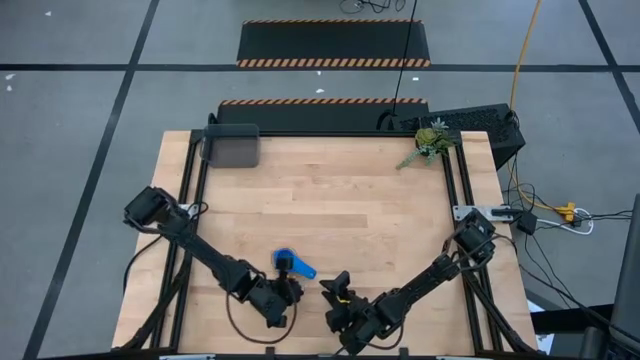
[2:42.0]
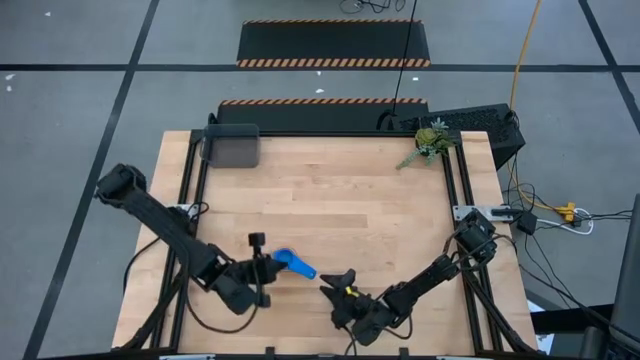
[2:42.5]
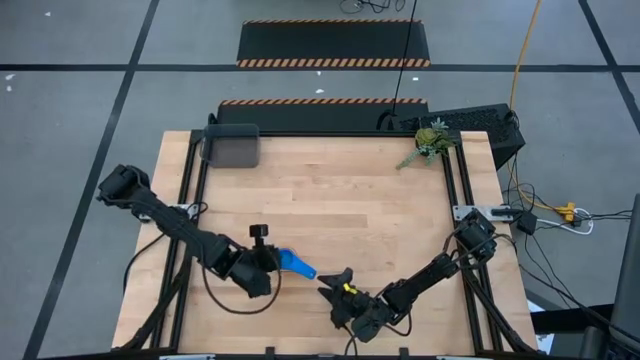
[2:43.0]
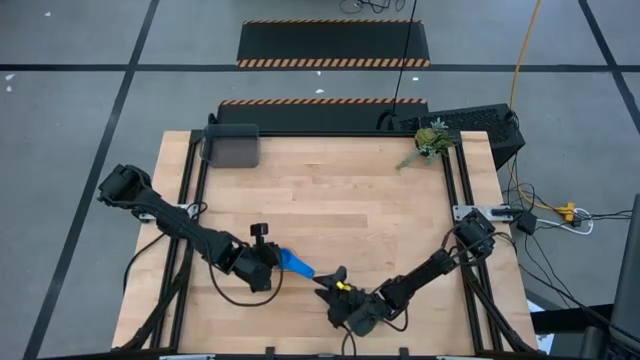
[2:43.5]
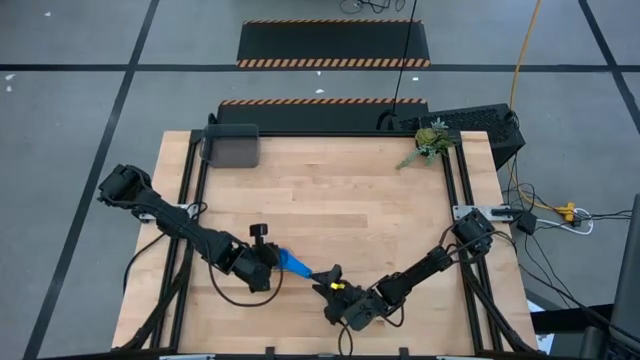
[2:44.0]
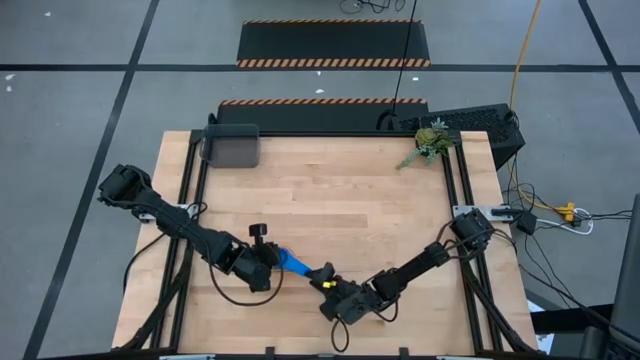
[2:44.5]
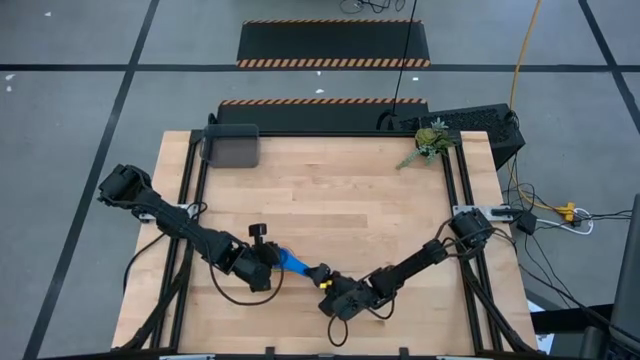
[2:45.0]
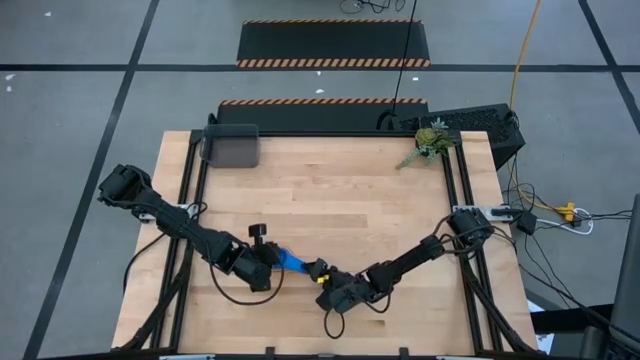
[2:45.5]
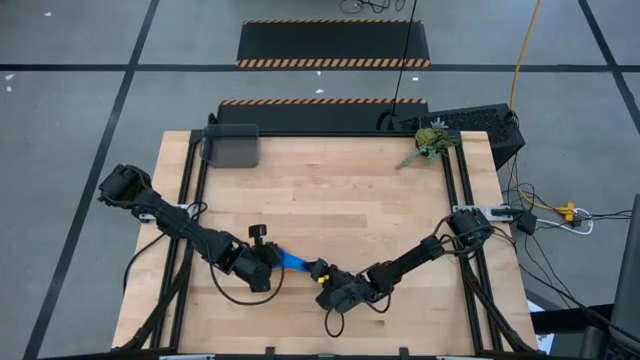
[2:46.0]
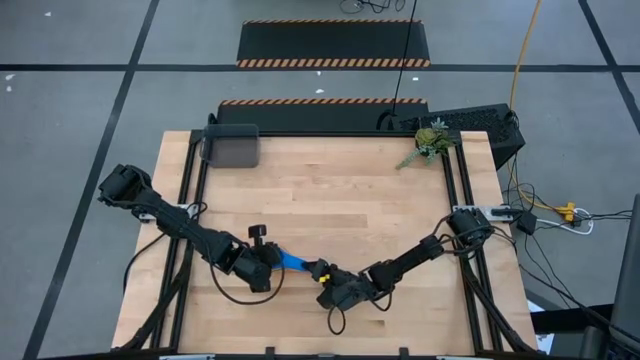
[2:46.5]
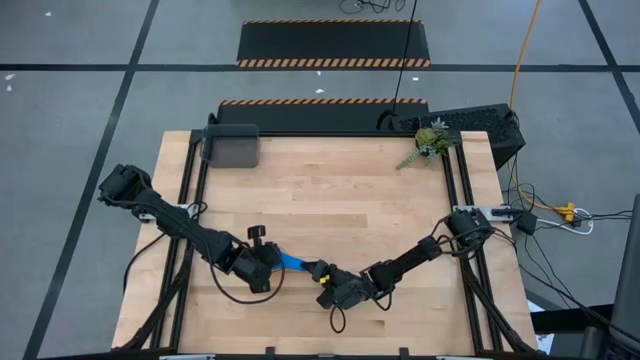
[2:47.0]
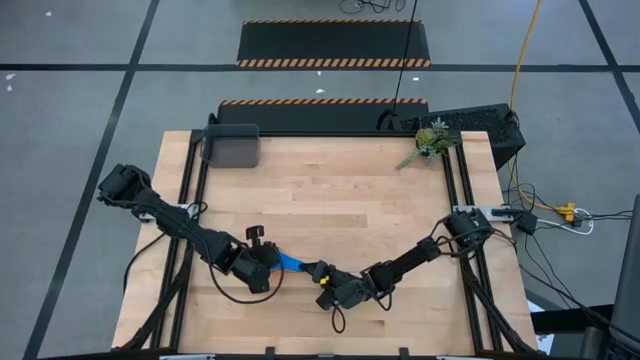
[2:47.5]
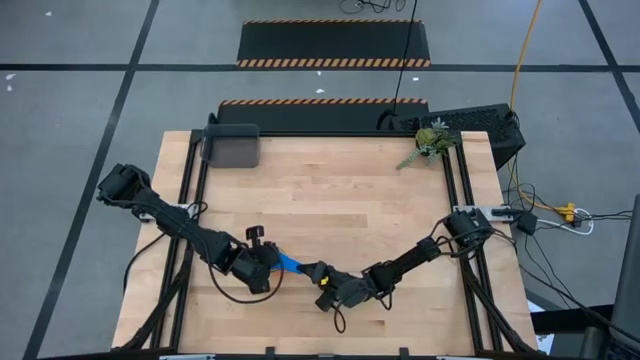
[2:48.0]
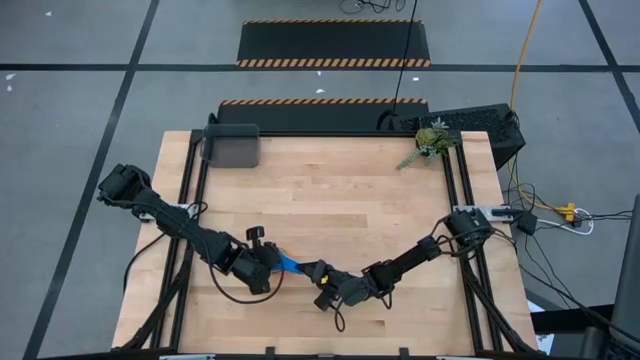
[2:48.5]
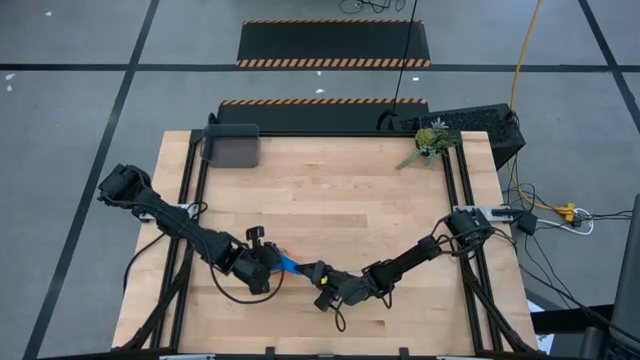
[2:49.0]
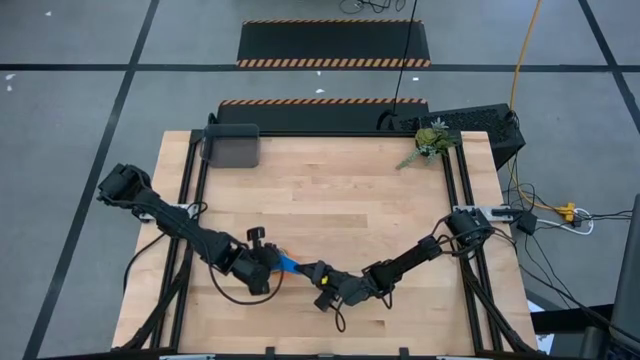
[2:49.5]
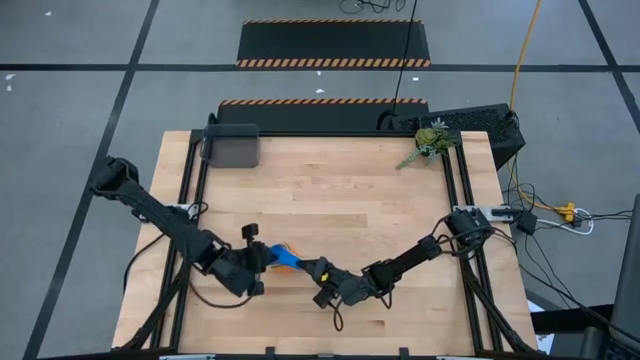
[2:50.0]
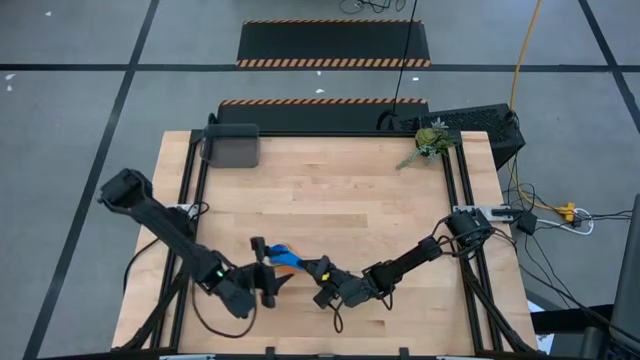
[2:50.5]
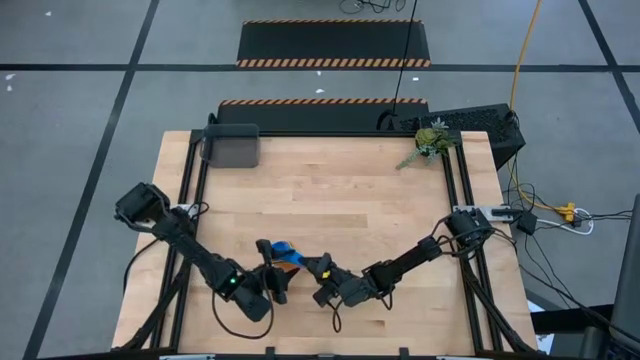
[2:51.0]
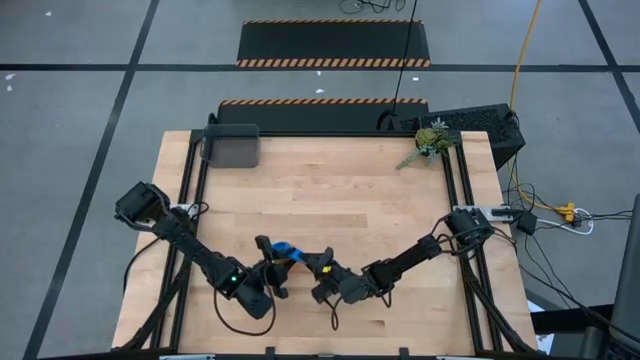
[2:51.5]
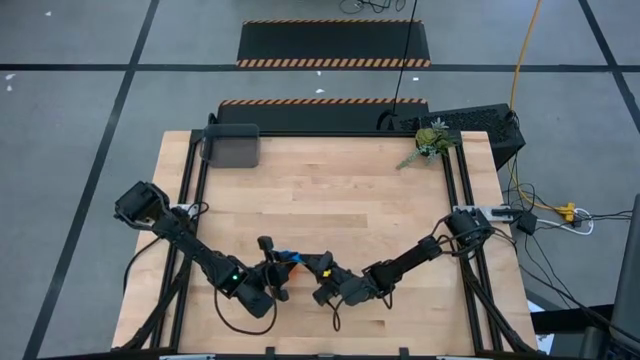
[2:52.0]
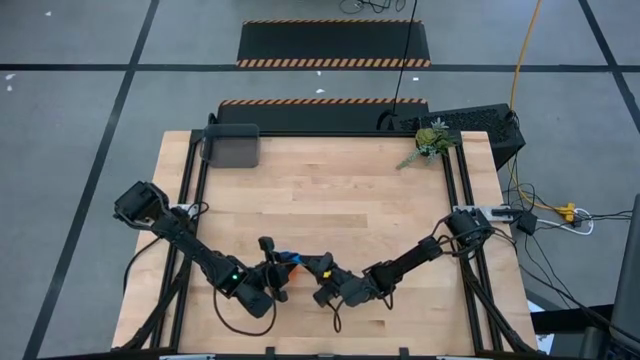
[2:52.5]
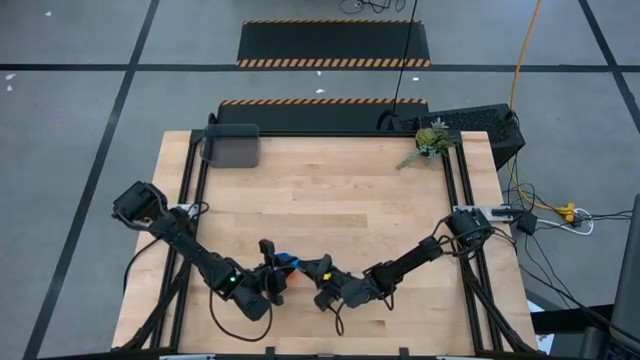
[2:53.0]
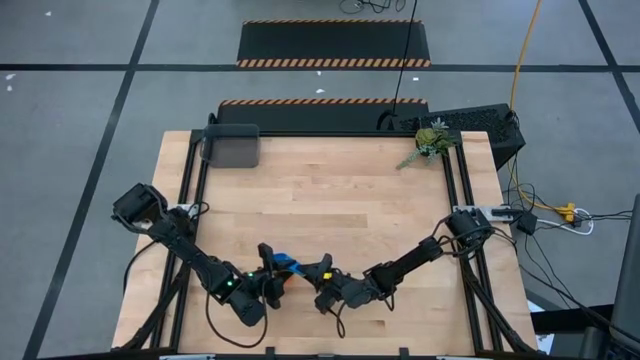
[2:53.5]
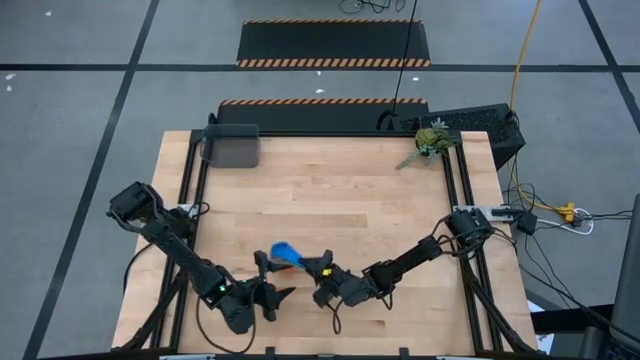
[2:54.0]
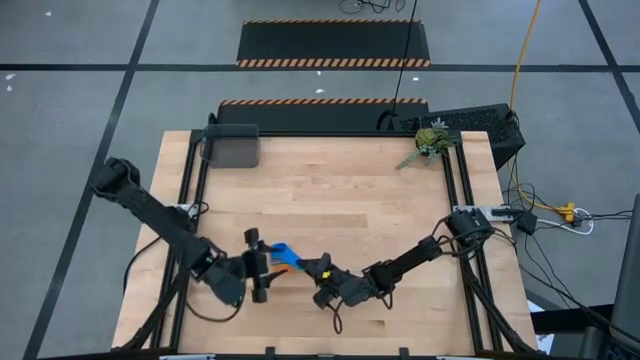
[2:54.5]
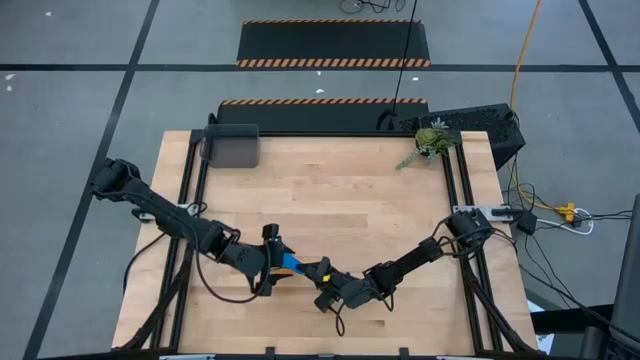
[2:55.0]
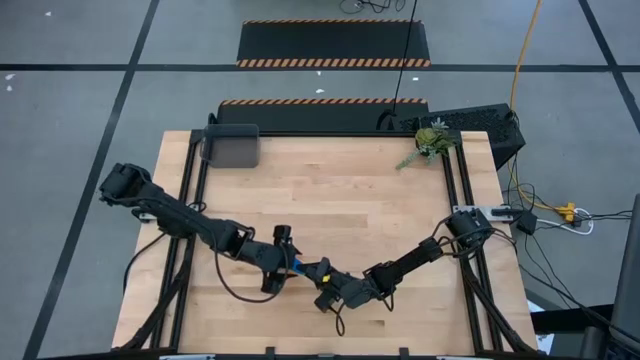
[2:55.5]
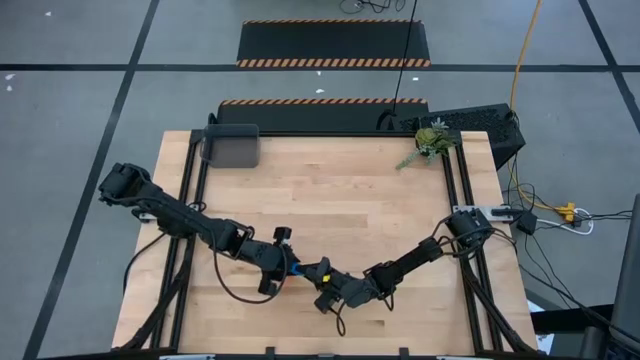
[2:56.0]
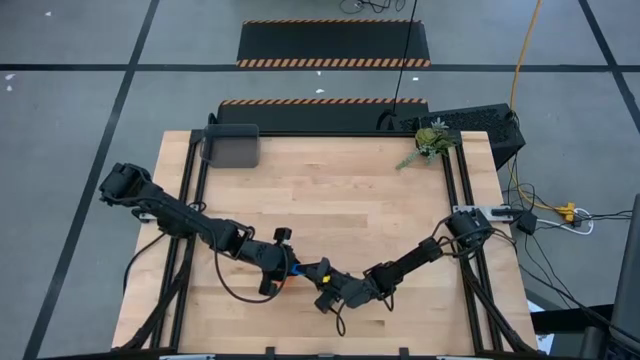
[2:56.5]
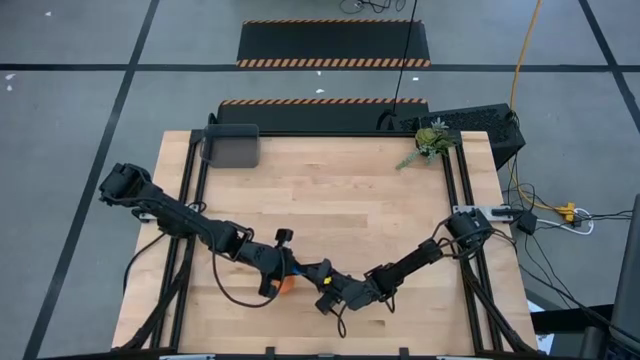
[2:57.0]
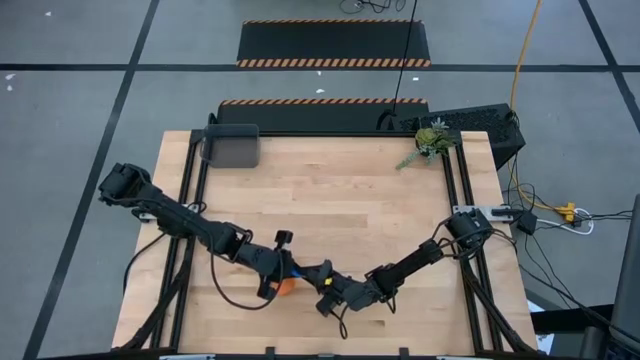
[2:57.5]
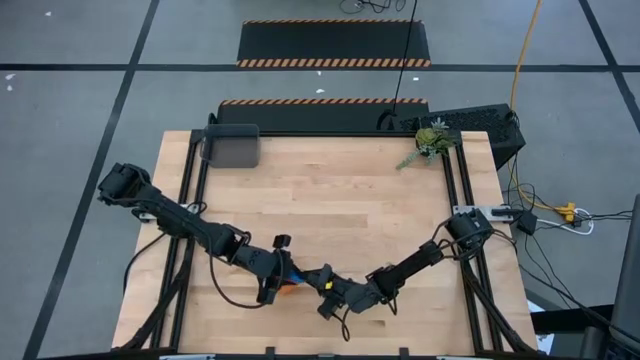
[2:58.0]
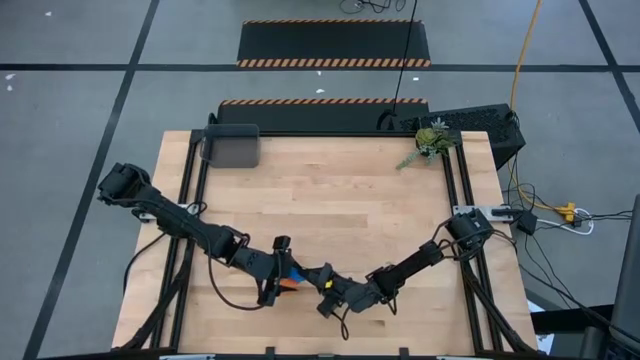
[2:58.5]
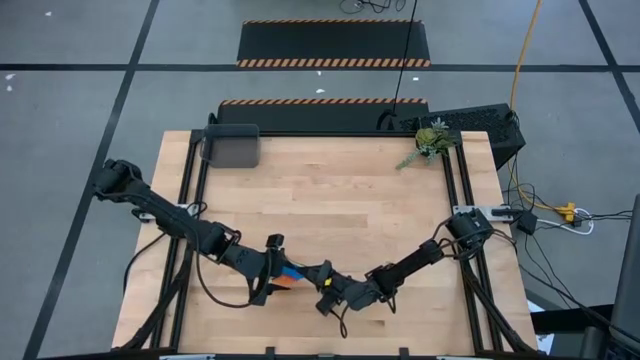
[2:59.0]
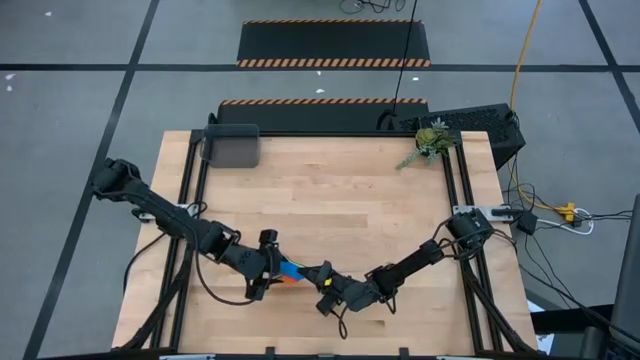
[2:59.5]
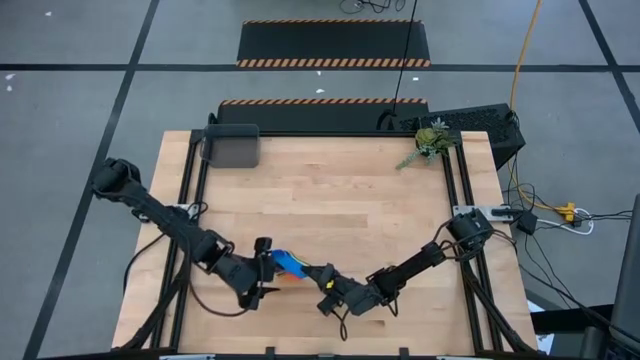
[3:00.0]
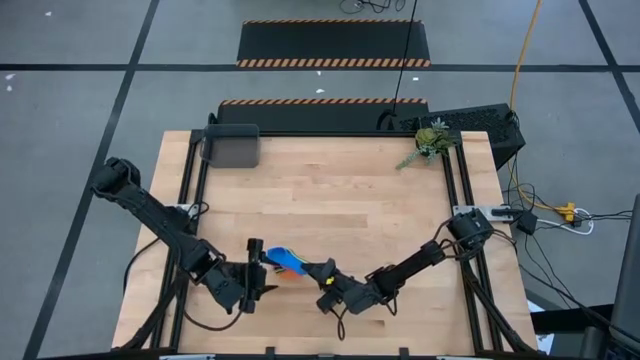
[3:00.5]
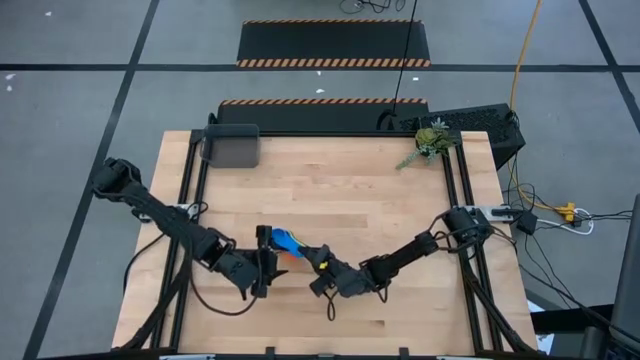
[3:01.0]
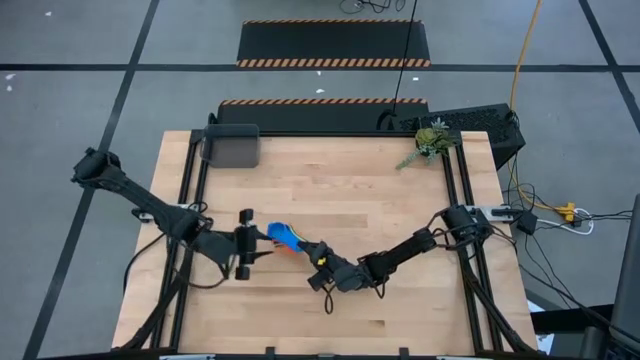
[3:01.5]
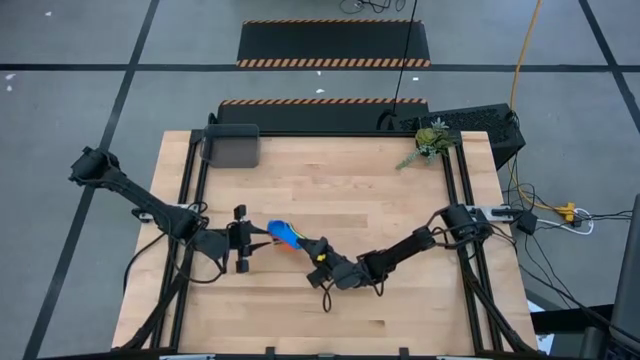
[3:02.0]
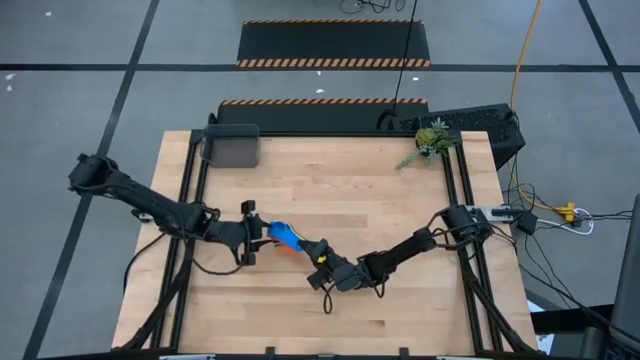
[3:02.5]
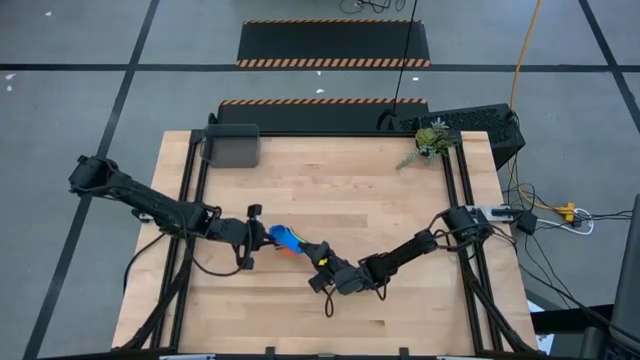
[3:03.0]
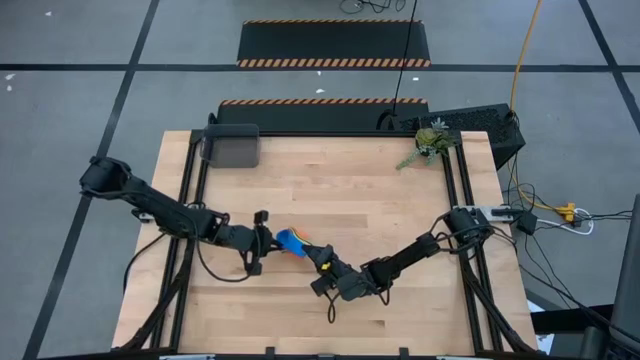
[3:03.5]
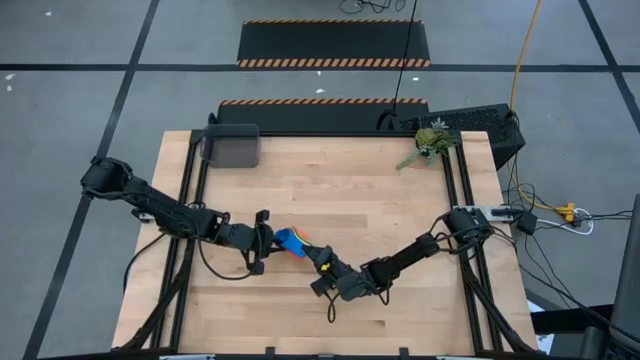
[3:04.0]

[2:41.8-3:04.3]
Task: Nest measuring cups in basket
Put the stacked measuring cups into the black bin
